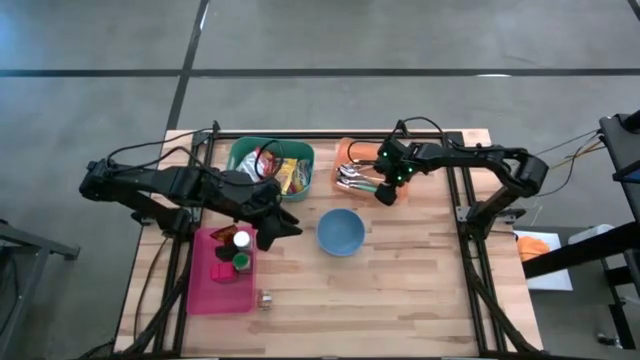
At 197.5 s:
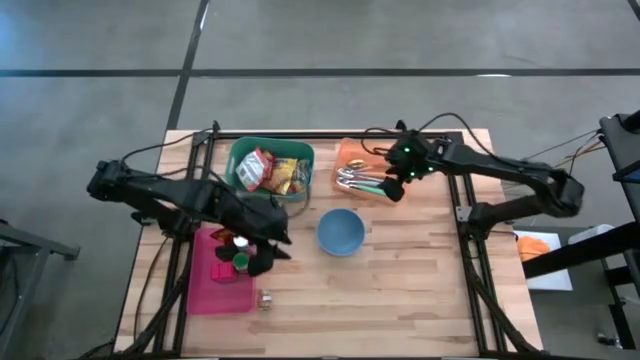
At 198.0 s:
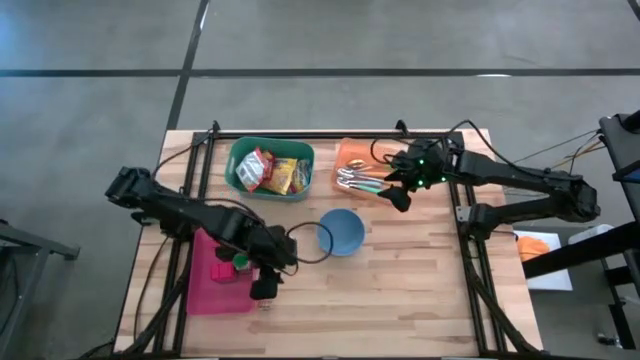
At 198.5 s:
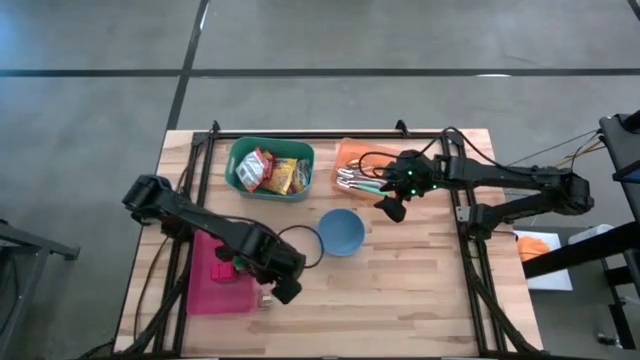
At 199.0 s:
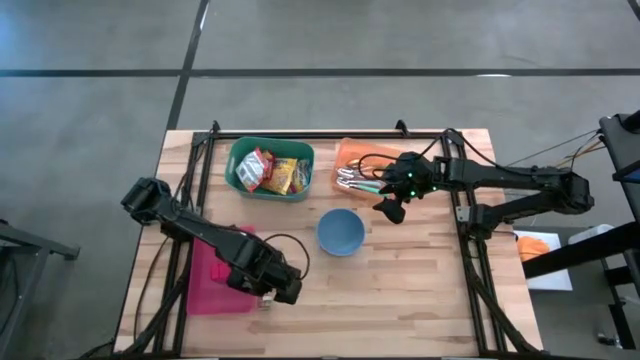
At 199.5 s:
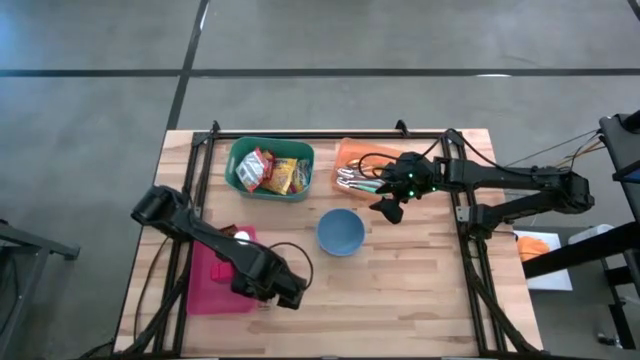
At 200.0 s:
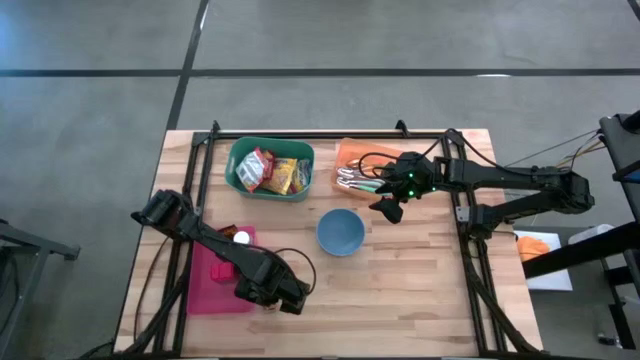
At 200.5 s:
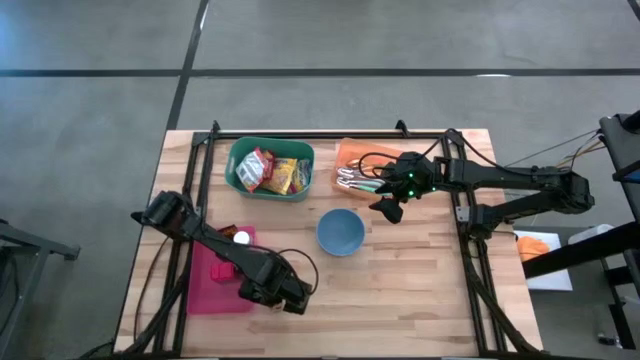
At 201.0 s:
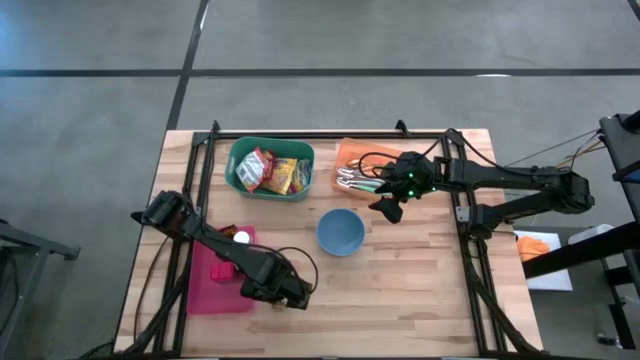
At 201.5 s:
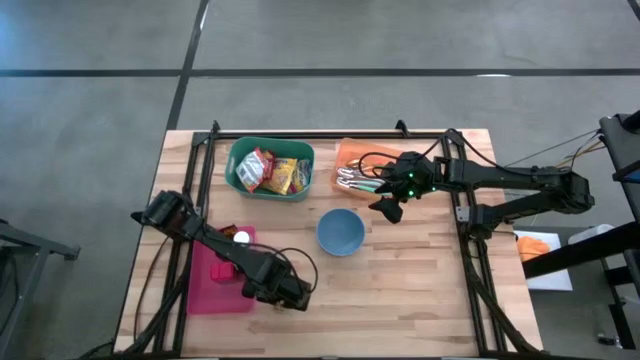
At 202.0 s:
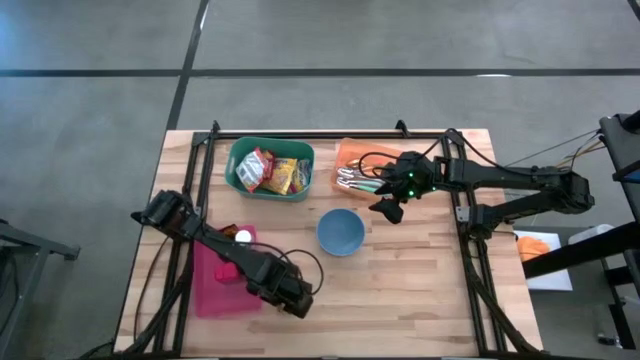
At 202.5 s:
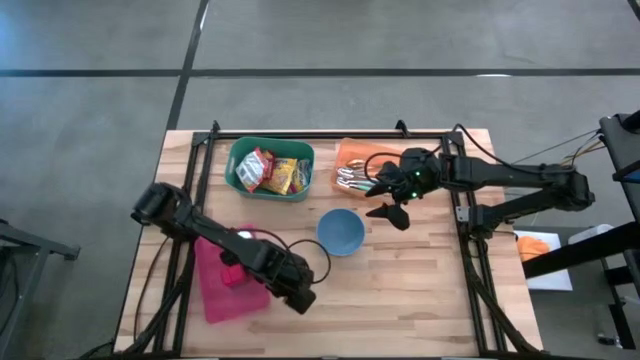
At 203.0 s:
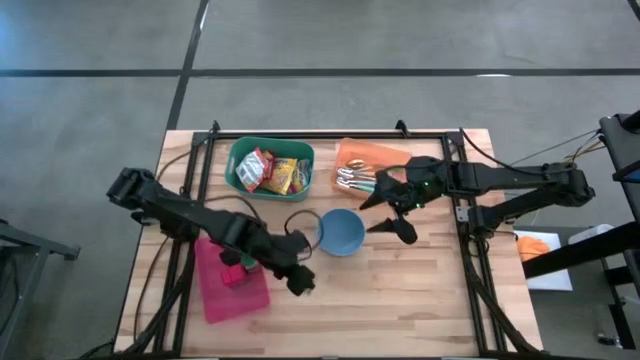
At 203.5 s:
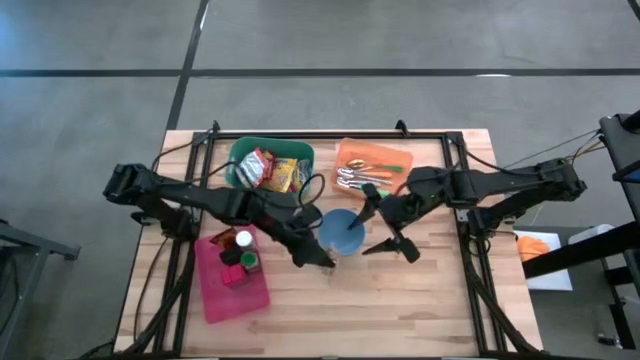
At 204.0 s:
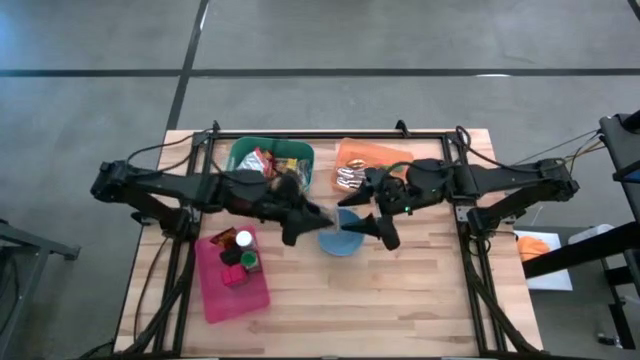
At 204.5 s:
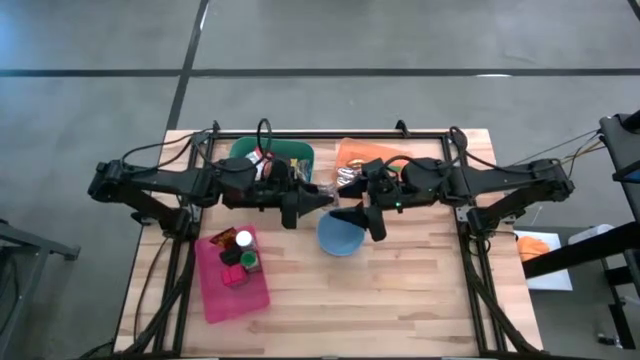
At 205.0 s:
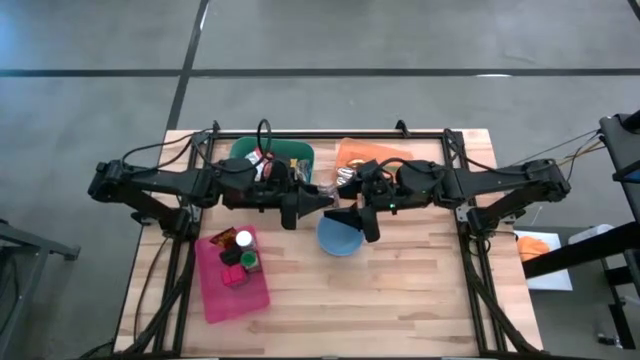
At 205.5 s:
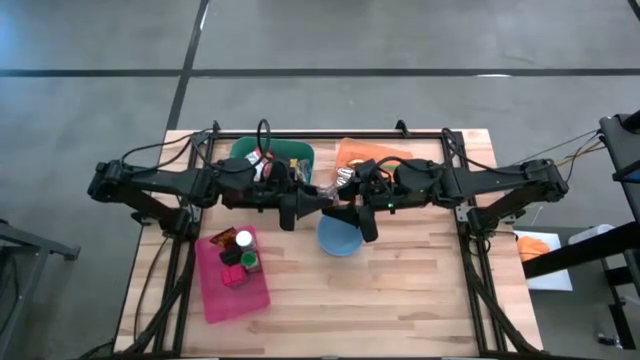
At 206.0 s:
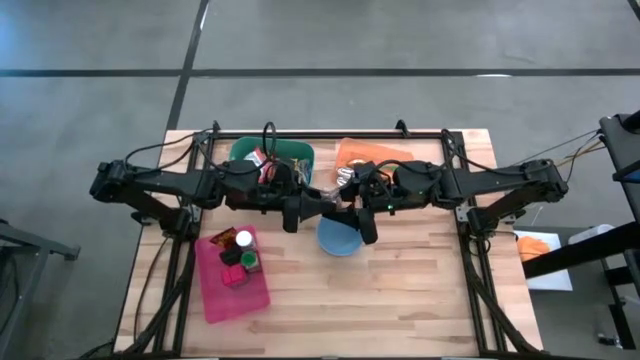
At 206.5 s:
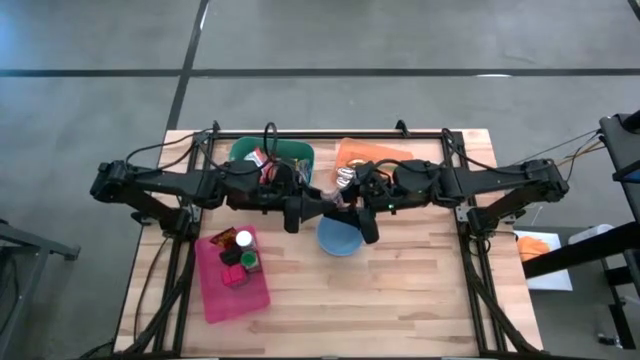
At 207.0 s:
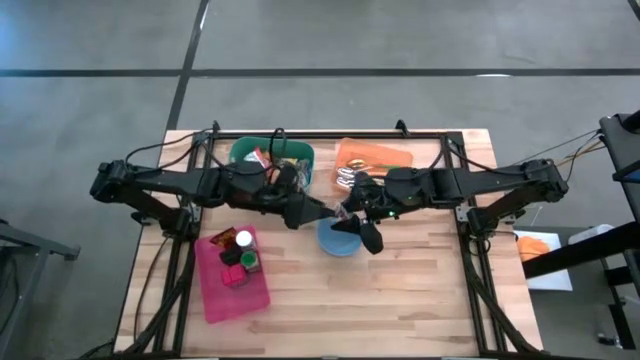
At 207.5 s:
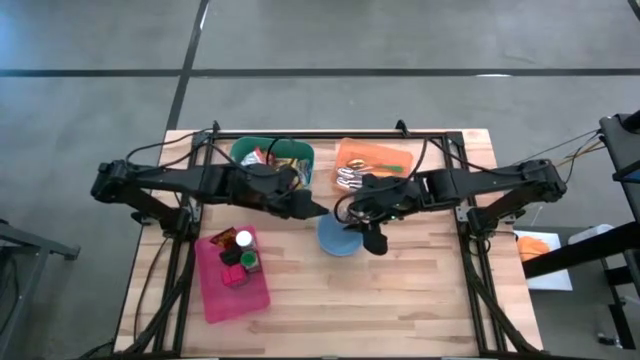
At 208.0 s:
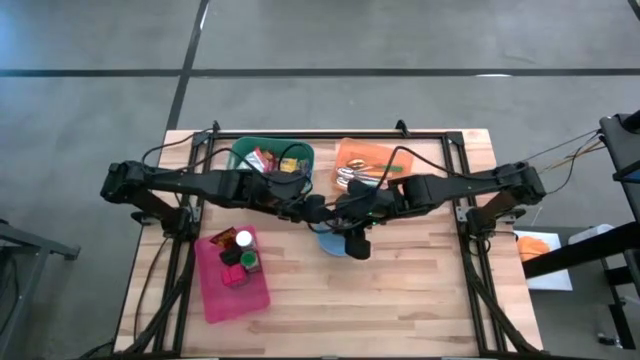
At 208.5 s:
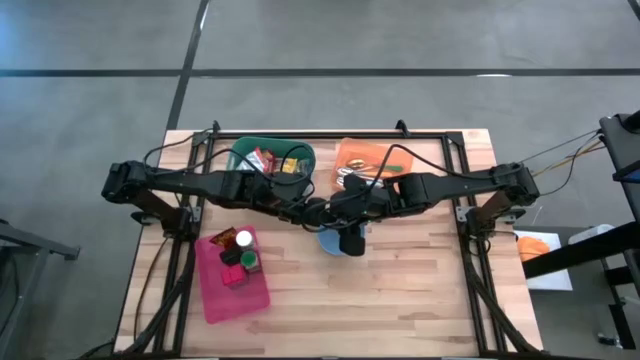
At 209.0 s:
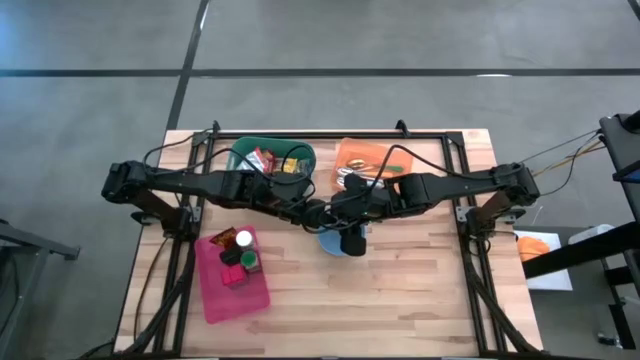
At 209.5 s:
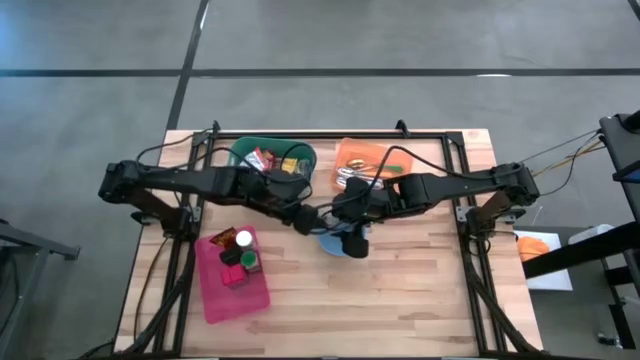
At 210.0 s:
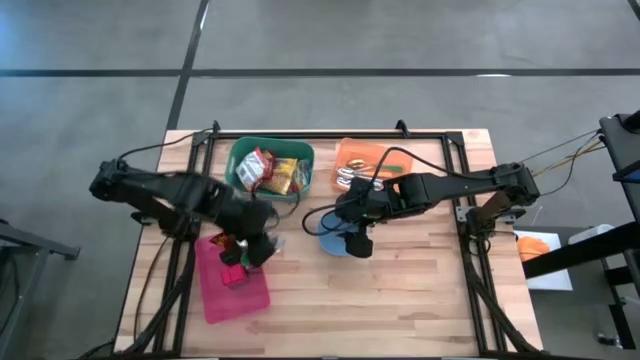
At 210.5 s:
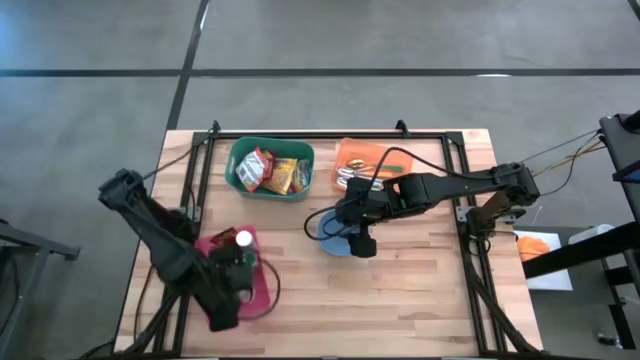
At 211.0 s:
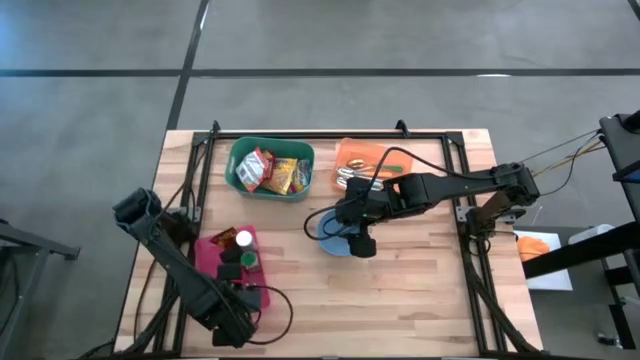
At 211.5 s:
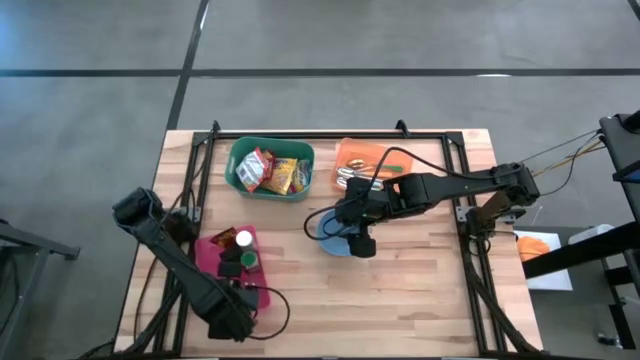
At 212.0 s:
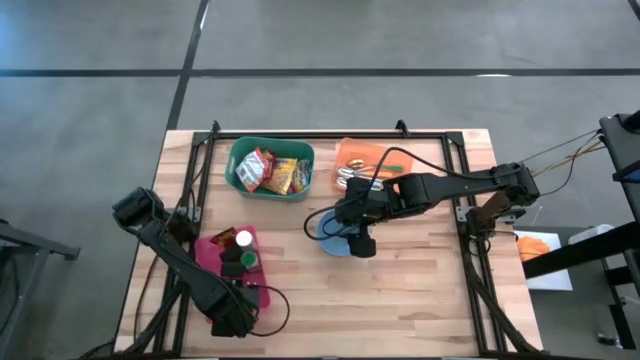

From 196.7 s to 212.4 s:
Put the brown spice bottle into the pink bin

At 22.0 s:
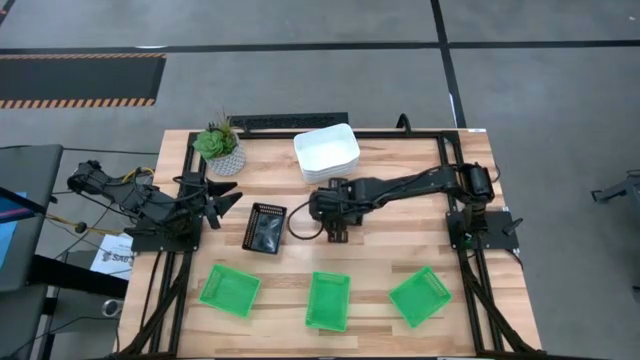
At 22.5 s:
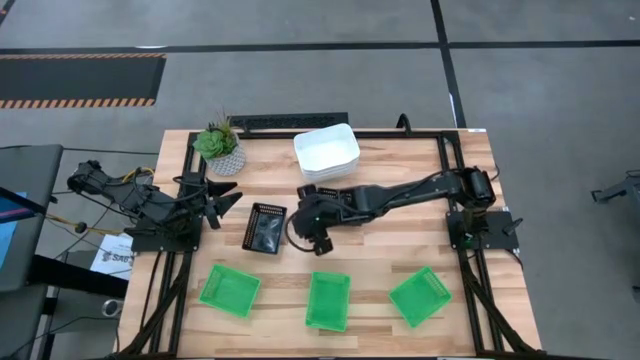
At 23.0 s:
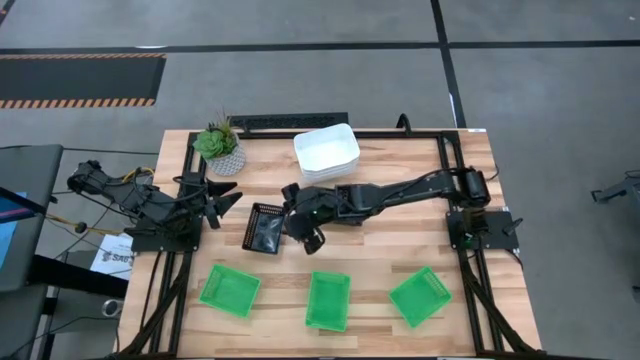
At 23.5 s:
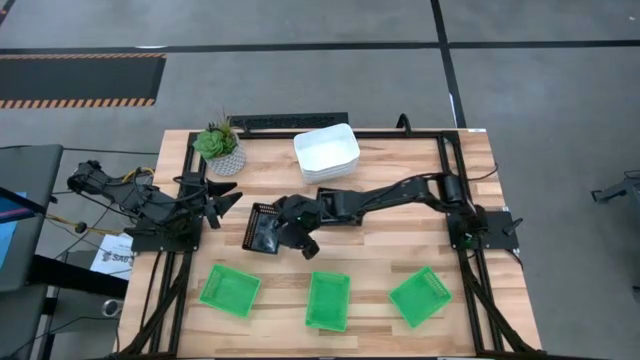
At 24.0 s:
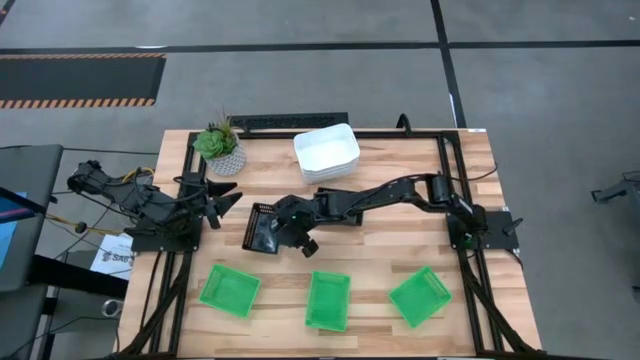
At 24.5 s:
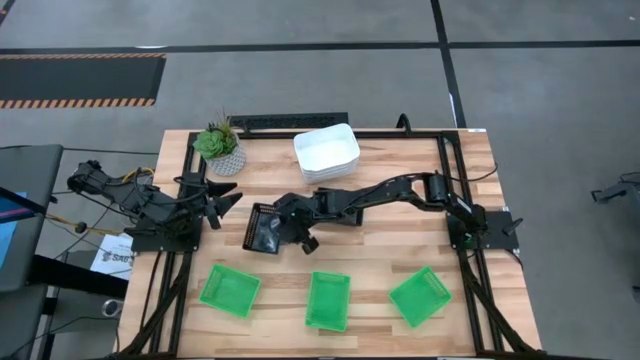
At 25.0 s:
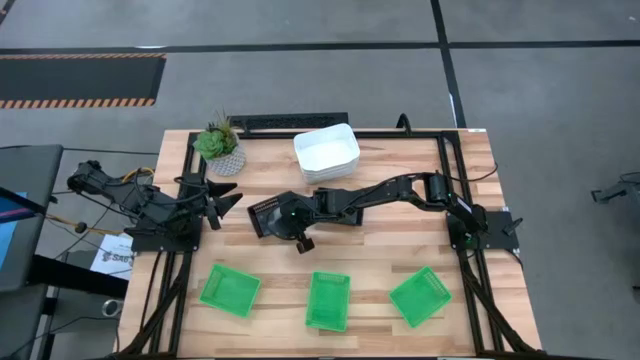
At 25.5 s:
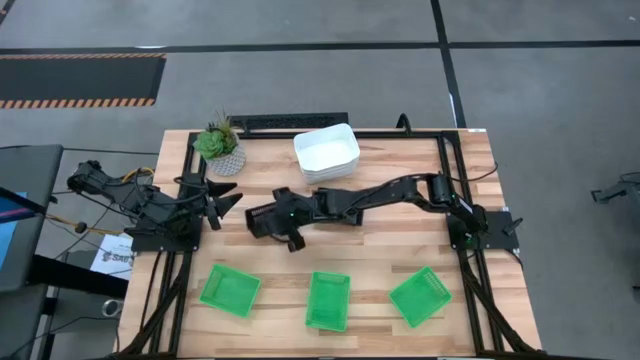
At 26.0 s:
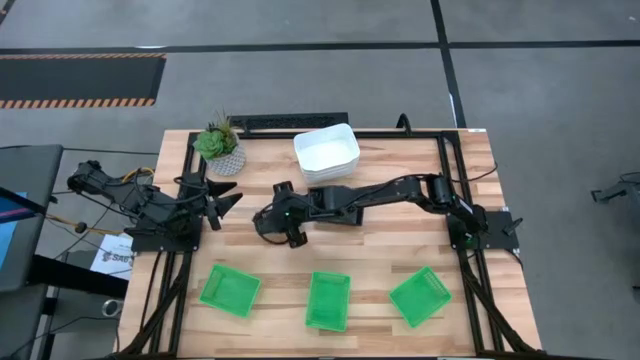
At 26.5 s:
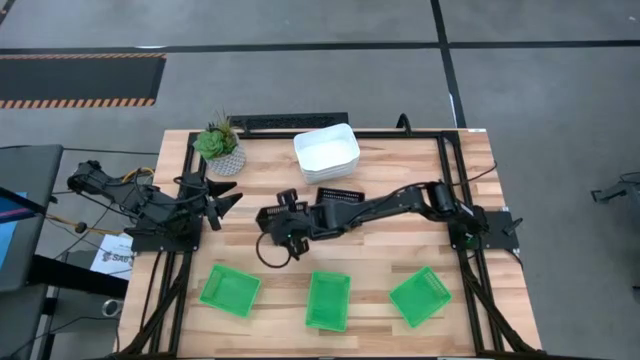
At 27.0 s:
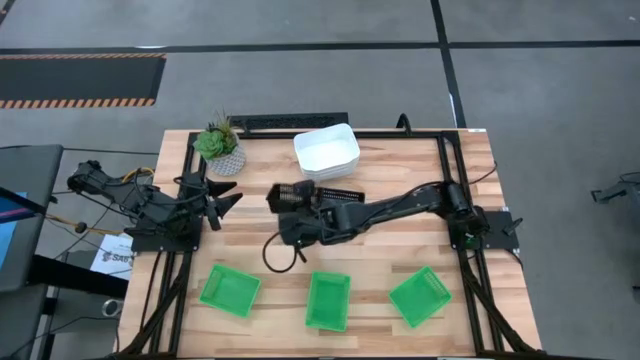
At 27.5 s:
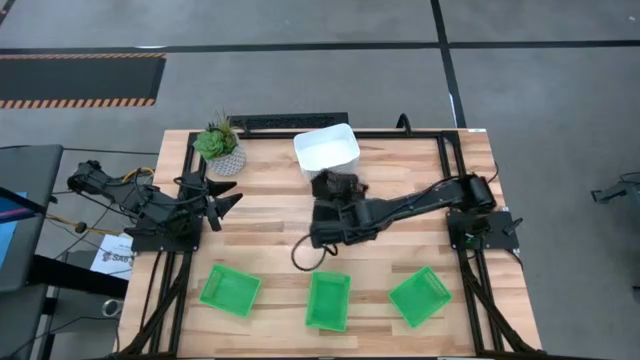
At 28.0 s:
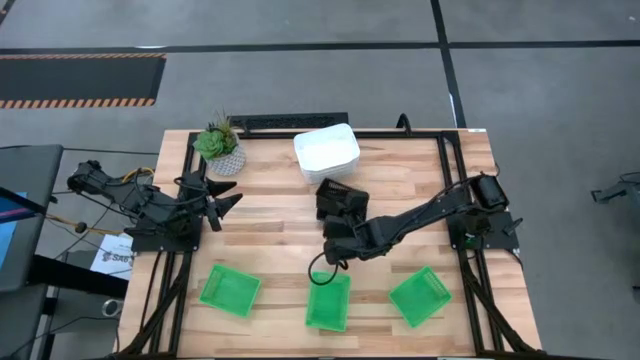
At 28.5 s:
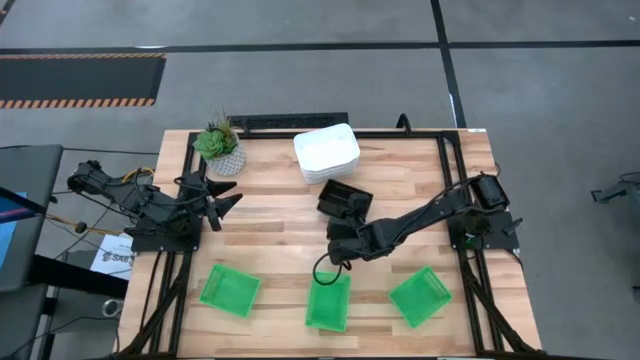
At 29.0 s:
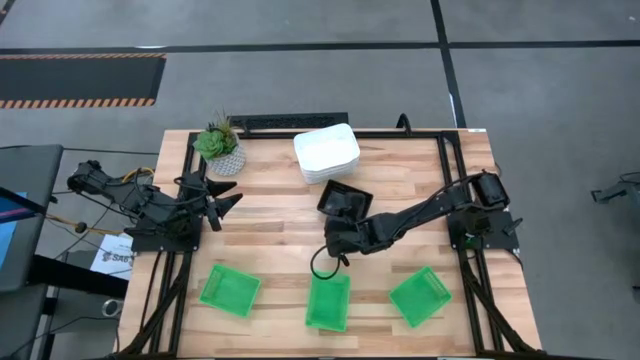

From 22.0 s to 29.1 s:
Stack the left black bin on top of the black bin
